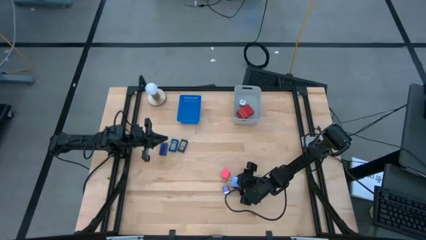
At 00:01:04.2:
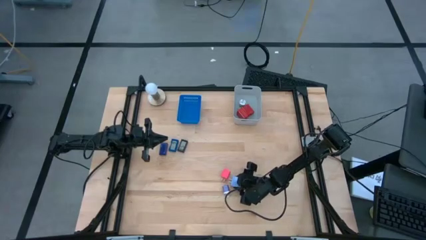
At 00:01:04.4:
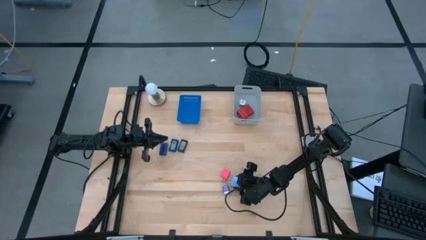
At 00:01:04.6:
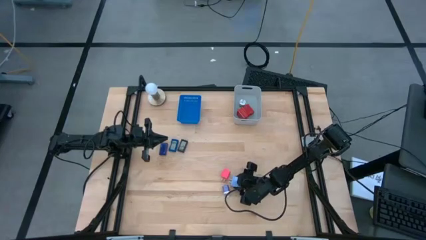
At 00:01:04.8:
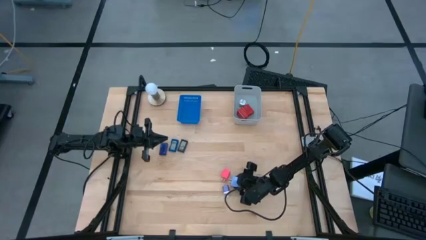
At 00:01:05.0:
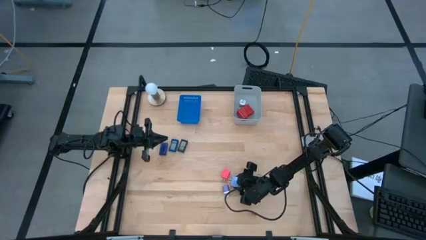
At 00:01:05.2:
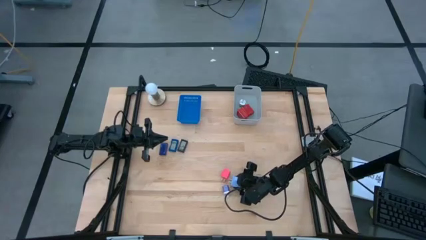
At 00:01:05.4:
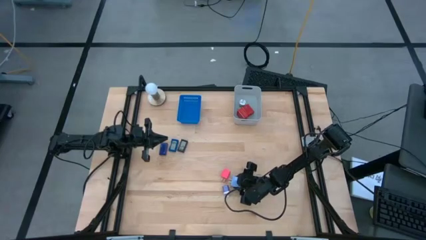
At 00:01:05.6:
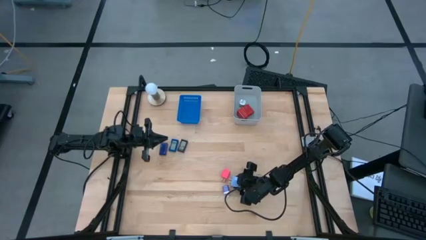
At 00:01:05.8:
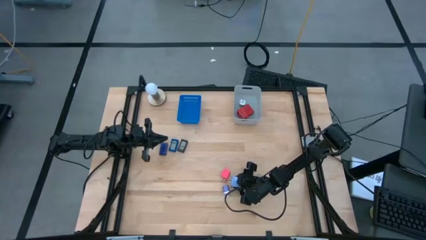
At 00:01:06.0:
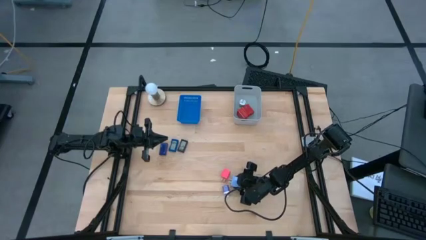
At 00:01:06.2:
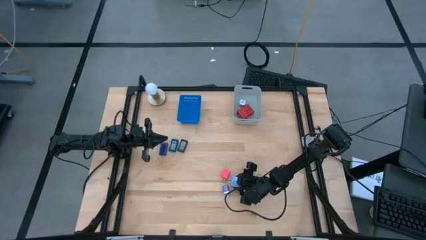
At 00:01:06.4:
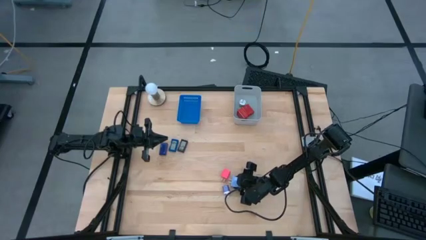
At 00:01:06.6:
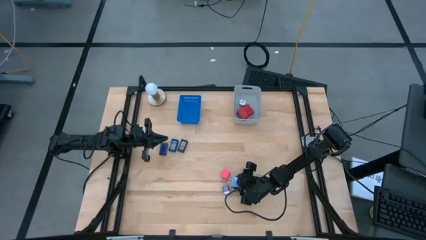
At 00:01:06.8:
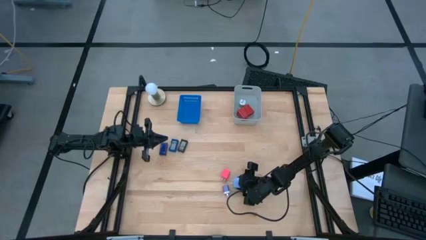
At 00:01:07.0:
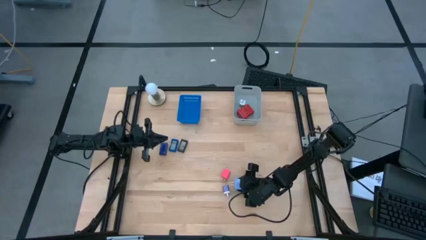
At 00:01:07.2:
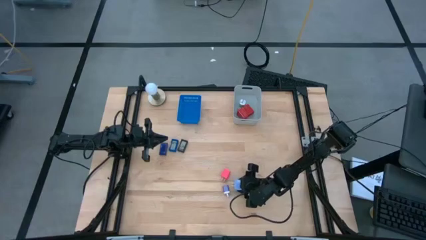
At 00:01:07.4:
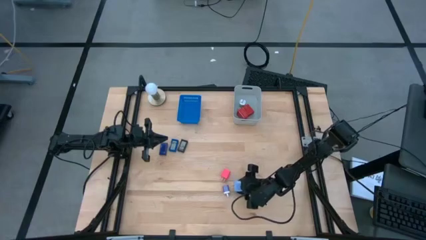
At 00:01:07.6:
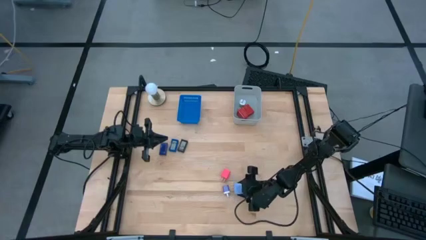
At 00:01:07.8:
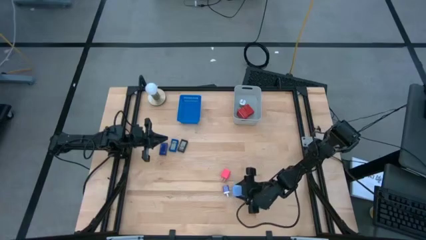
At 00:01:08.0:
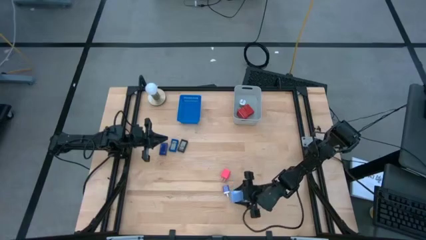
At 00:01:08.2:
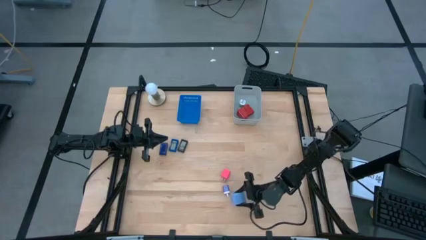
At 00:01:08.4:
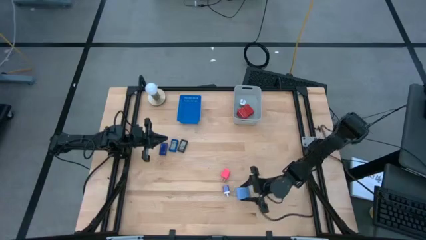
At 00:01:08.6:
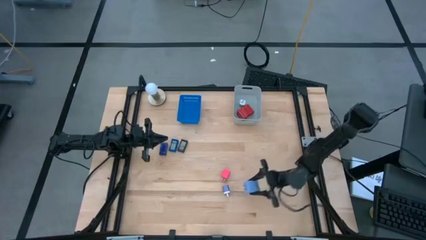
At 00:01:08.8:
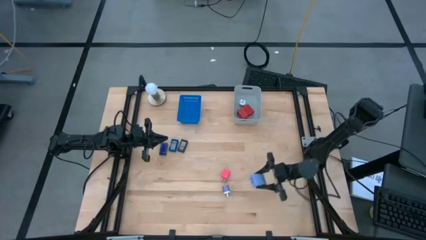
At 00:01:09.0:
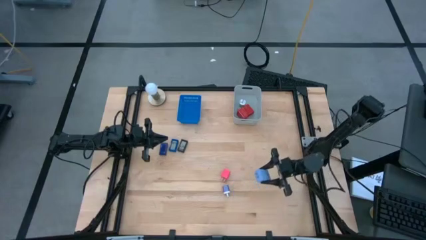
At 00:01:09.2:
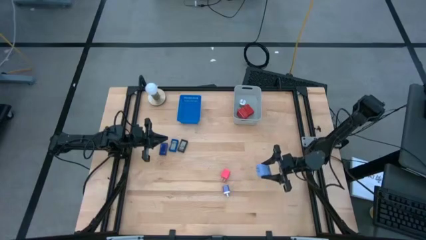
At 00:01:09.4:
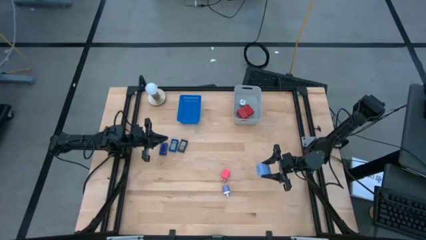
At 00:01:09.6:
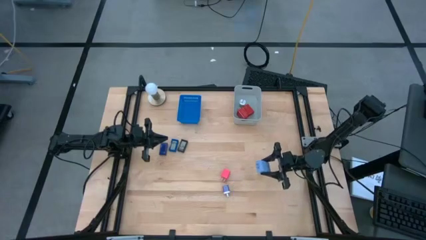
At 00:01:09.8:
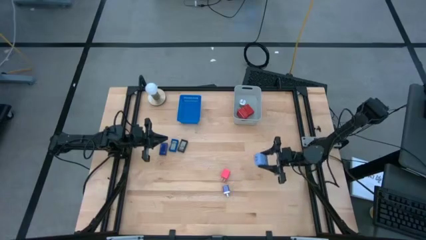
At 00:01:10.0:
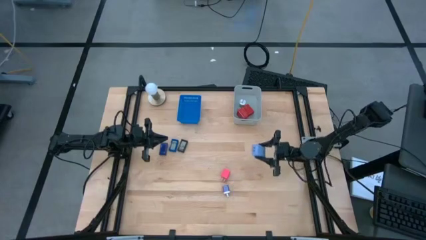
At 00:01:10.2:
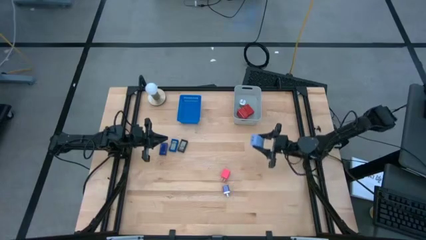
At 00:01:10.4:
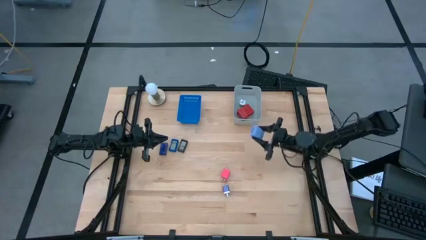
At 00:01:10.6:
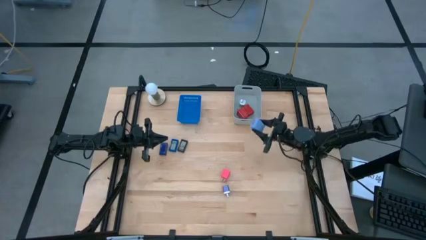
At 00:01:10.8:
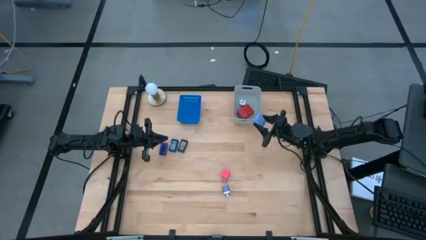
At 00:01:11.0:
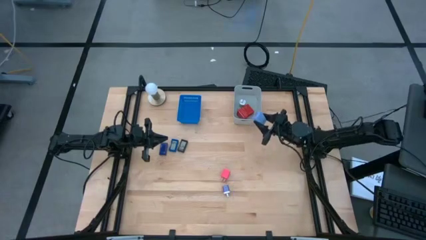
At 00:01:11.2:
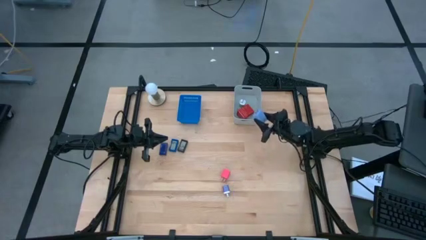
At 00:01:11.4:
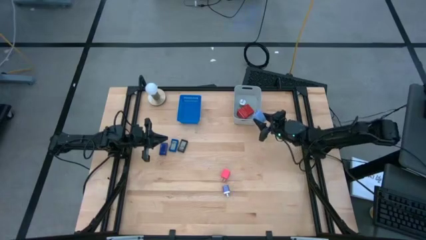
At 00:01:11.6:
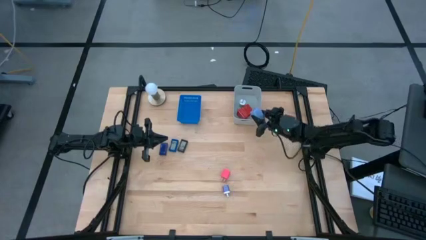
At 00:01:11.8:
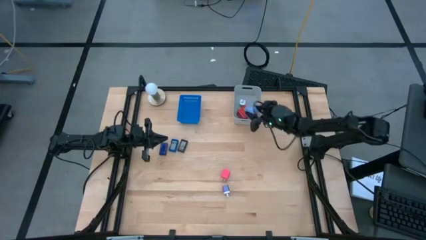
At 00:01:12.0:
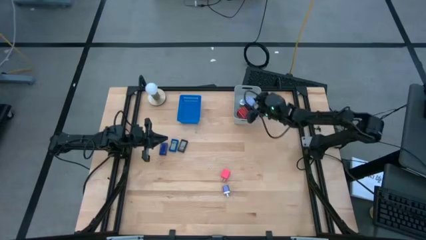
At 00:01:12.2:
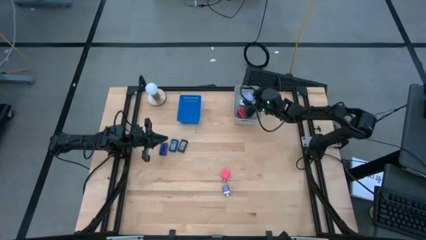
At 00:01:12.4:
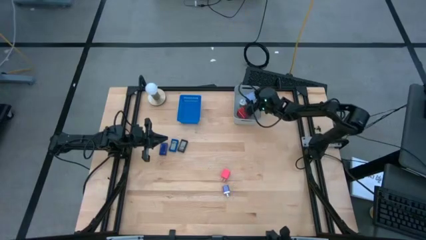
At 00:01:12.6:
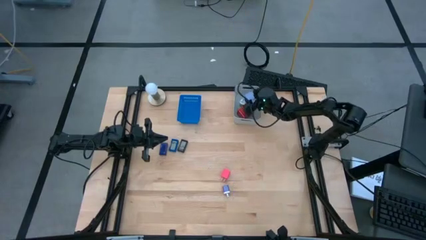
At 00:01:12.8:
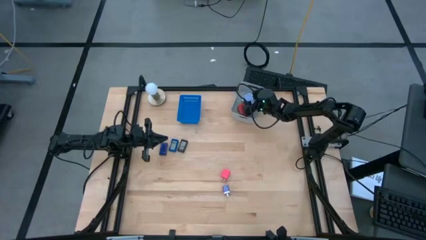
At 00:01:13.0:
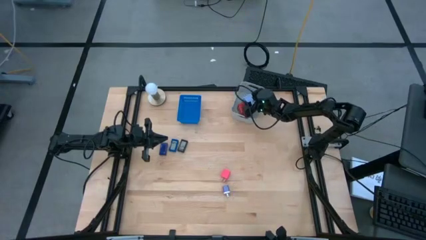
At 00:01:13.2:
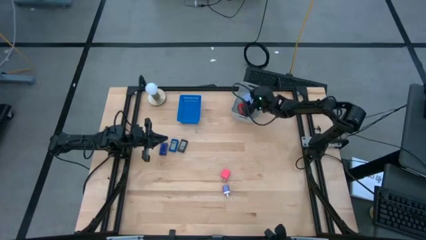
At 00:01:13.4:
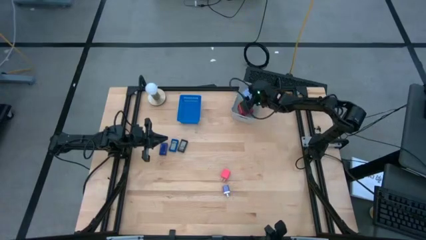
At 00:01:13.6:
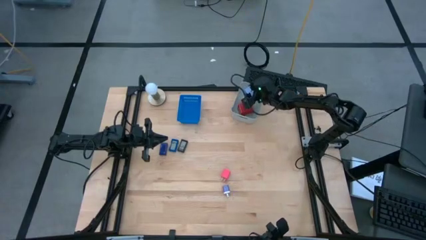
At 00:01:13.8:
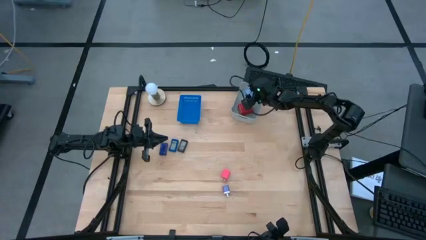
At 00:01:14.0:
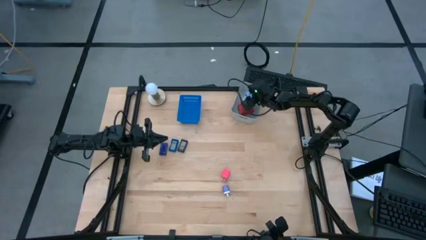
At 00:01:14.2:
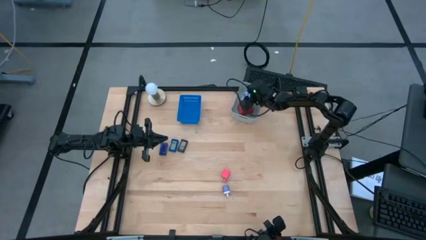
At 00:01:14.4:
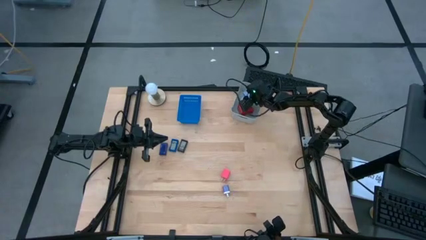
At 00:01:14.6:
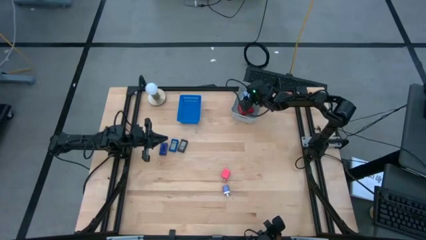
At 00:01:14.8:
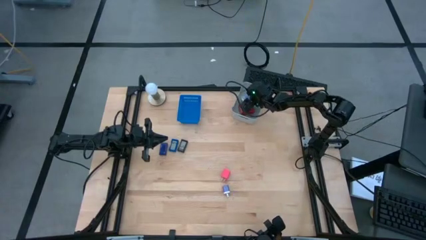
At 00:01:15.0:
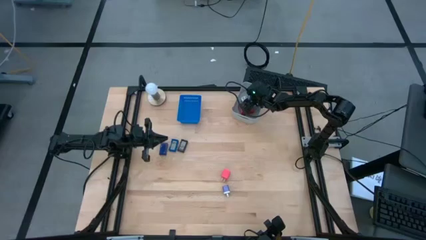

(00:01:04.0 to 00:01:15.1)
Task: Pick & Place Office items
Put the blue charger adapter into the gray bin
